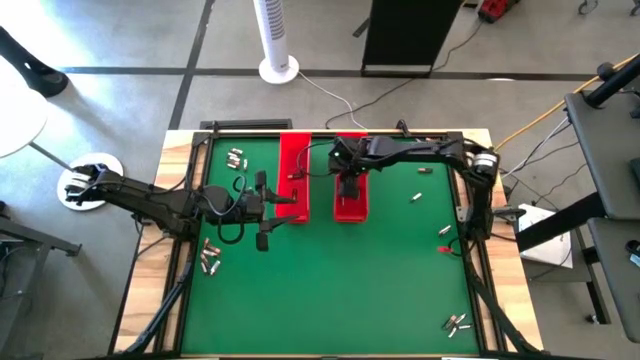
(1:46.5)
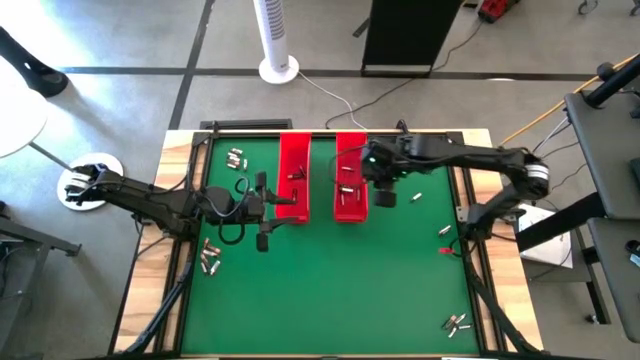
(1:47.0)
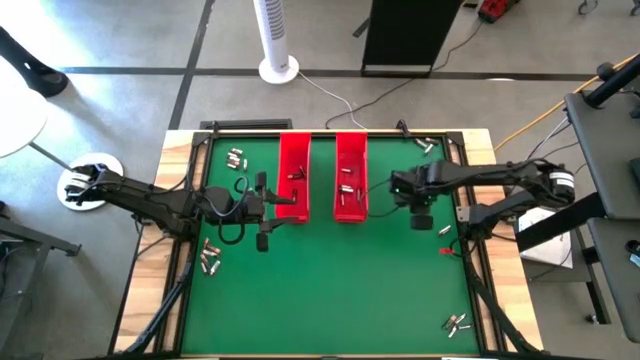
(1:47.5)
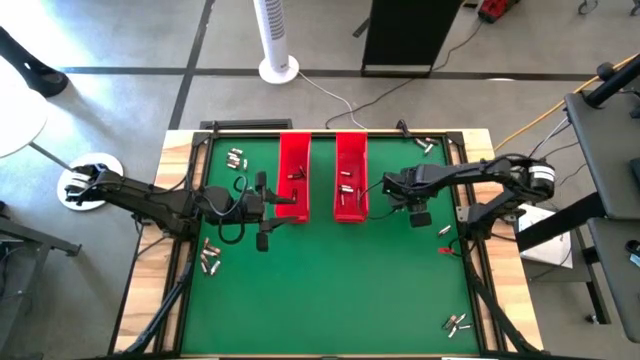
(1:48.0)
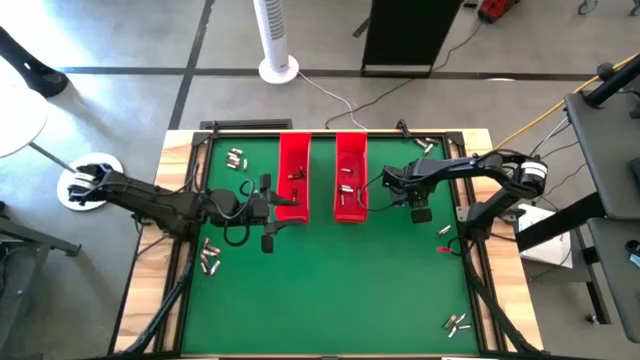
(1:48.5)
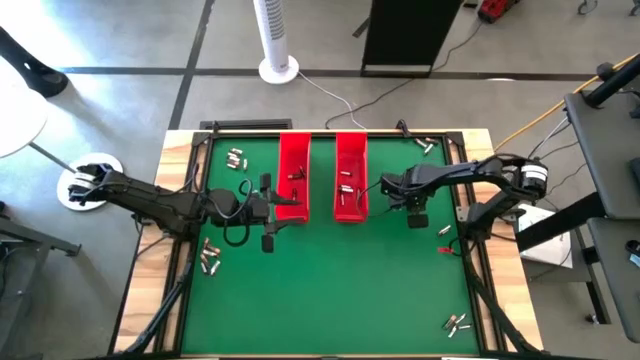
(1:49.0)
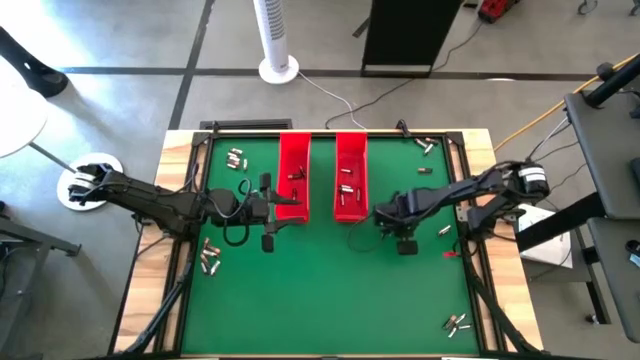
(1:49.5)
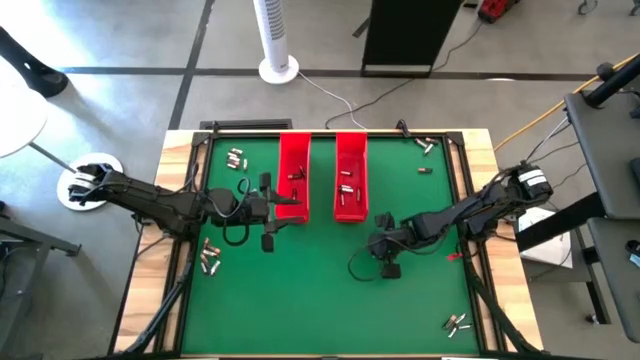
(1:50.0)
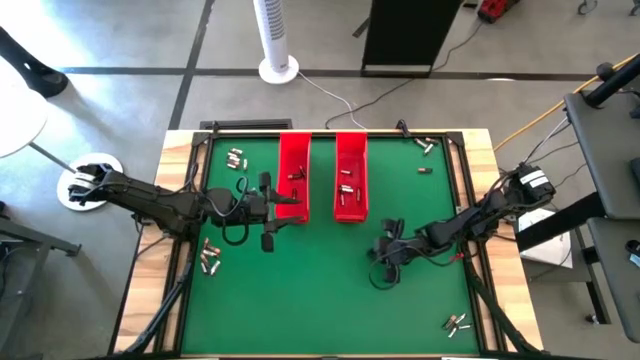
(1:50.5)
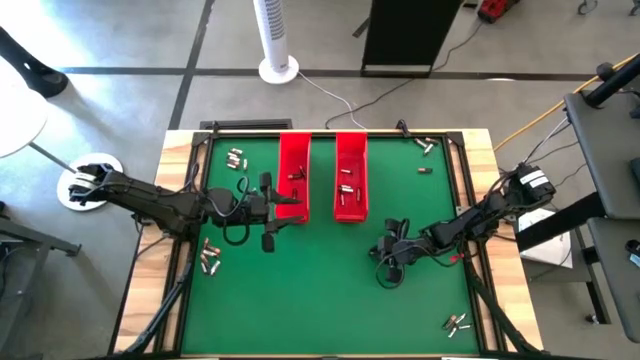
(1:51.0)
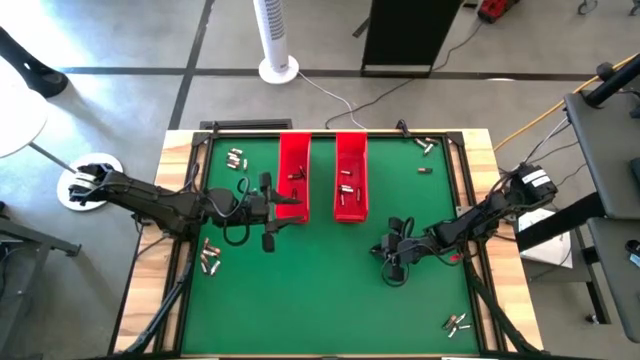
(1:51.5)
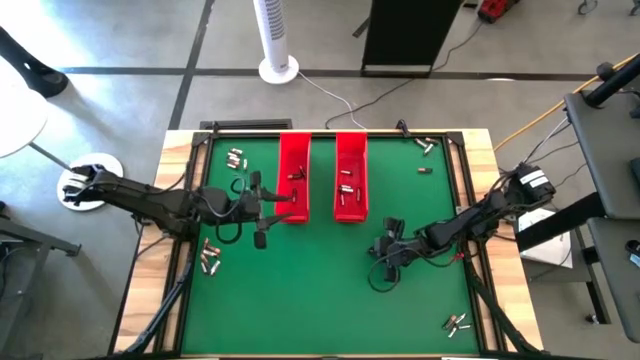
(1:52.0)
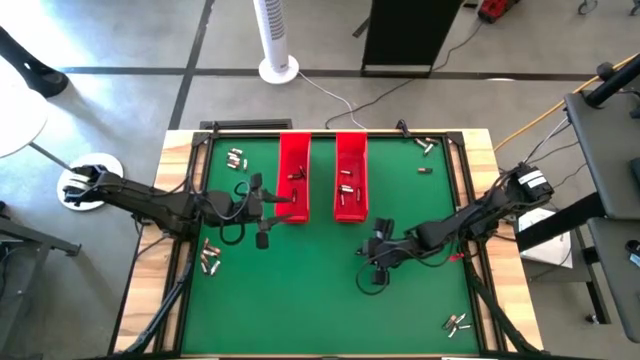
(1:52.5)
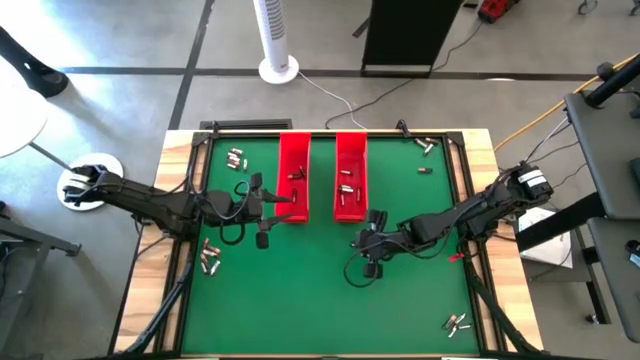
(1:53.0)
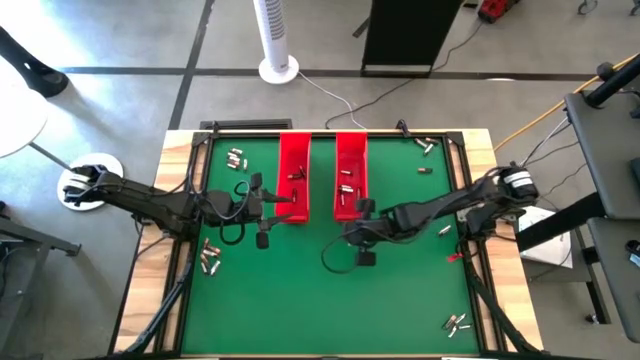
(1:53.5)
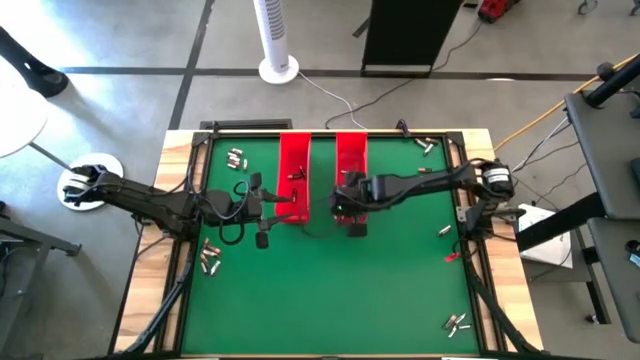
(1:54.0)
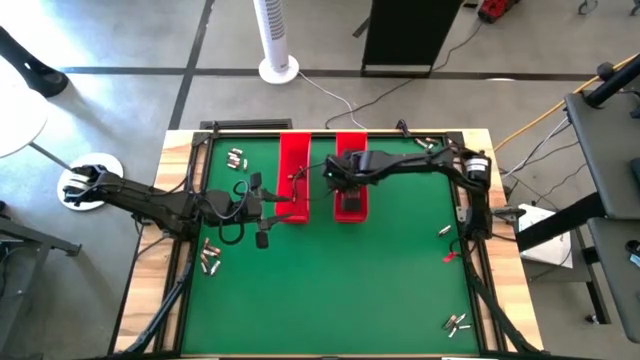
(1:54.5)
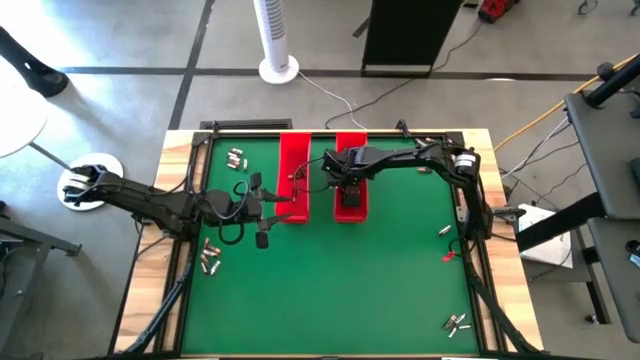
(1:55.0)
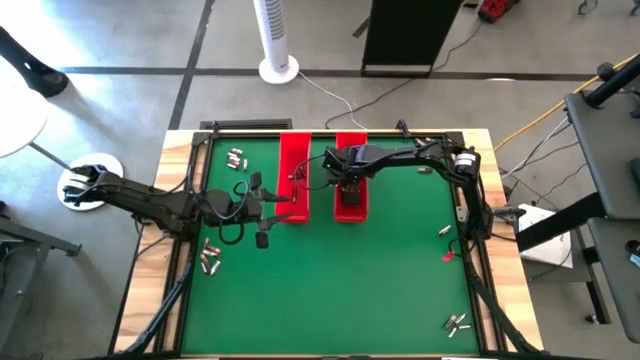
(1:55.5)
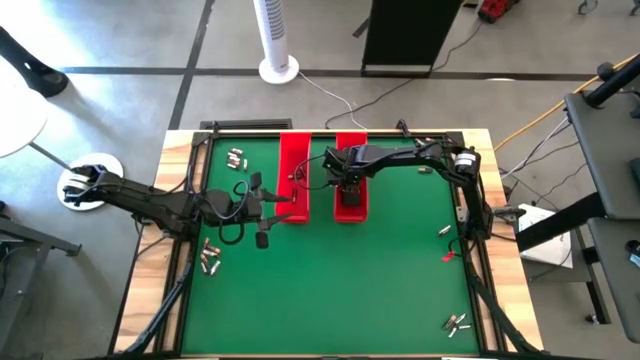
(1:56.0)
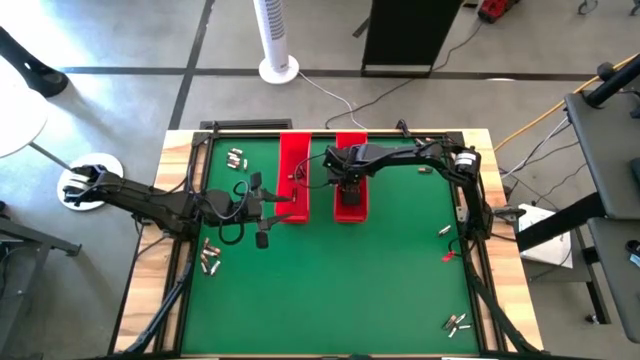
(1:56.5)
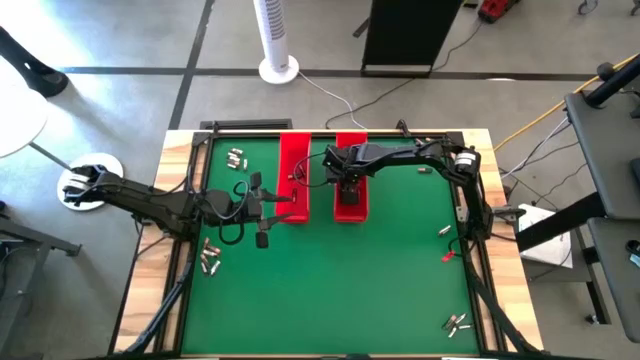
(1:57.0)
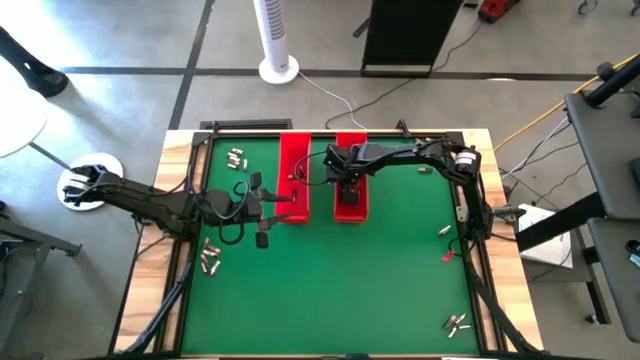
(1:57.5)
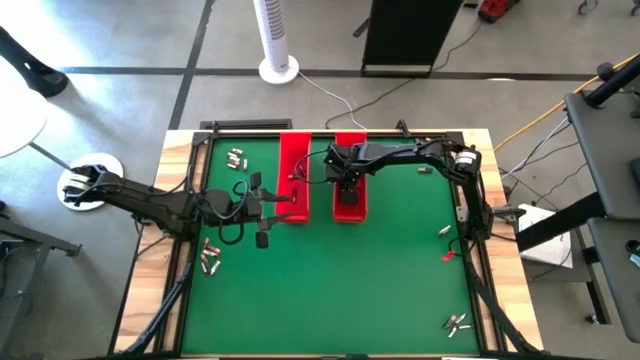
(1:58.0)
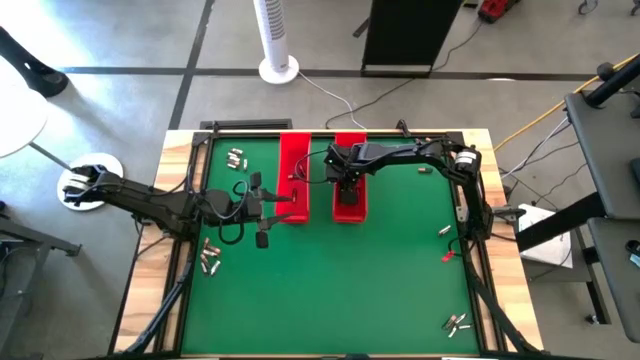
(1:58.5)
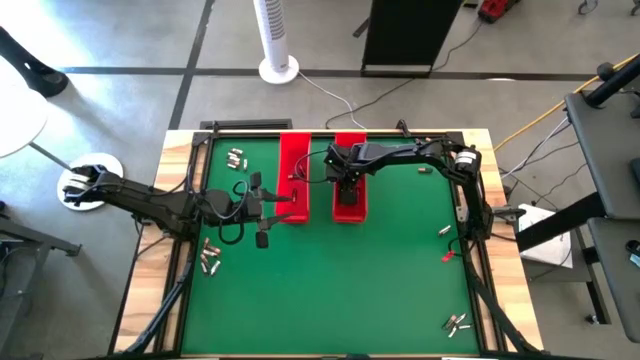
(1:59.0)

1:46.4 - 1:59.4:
Task: Sort batteries
Put the silver battery into the right red bin

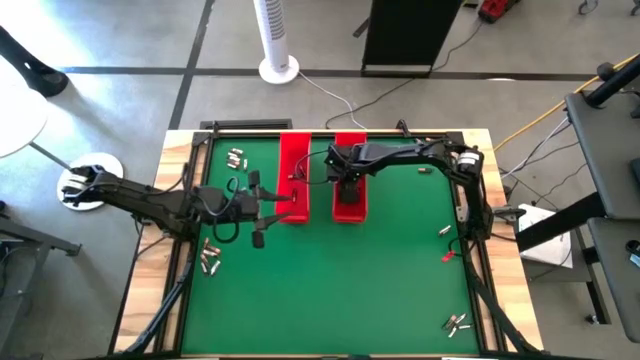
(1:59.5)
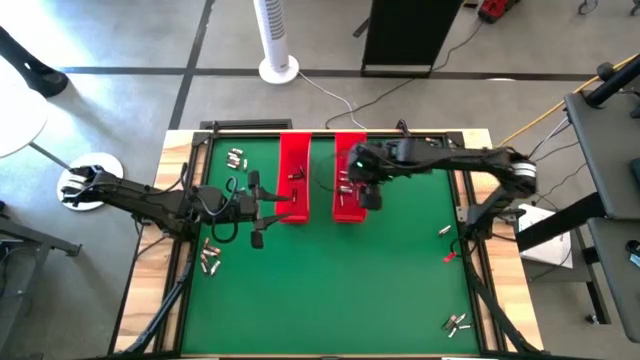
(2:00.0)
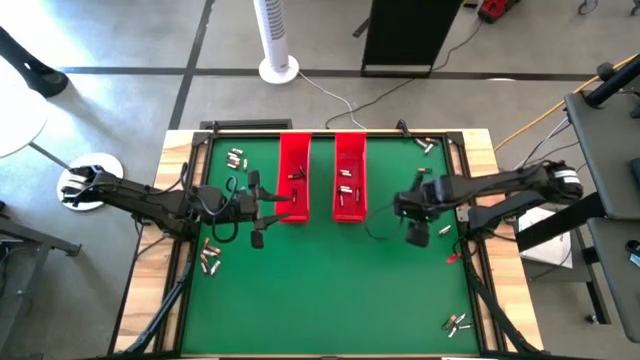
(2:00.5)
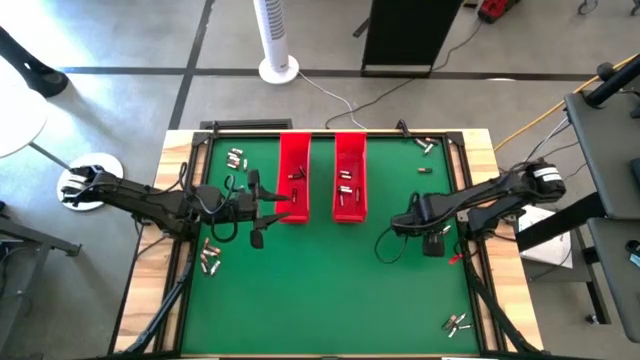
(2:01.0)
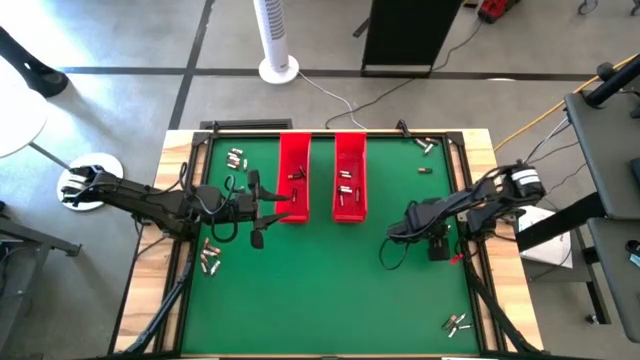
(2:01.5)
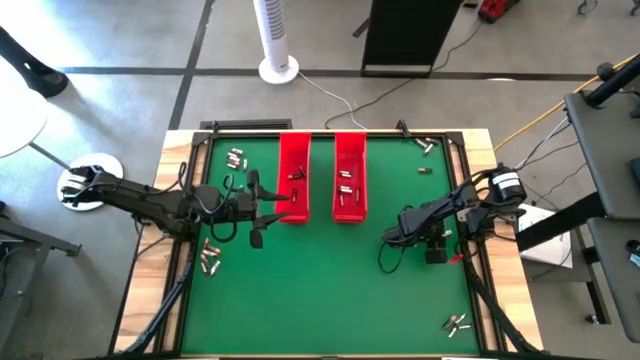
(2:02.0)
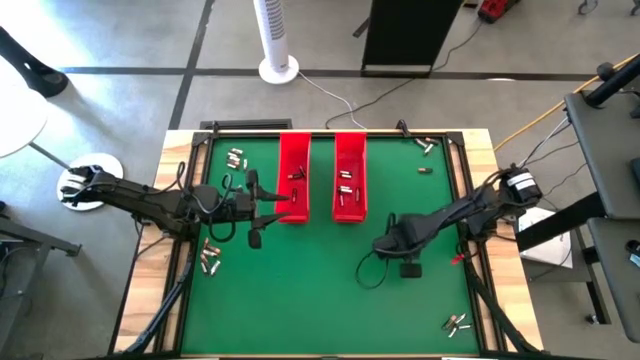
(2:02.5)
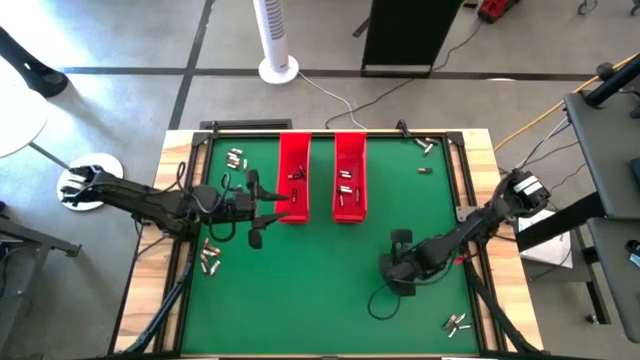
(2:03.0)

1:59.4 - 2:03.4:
Put the silver battery into the right red bin

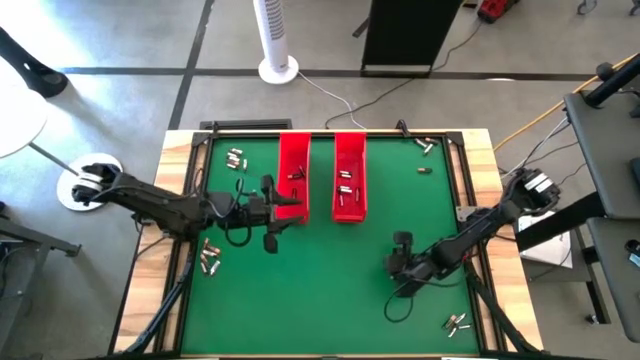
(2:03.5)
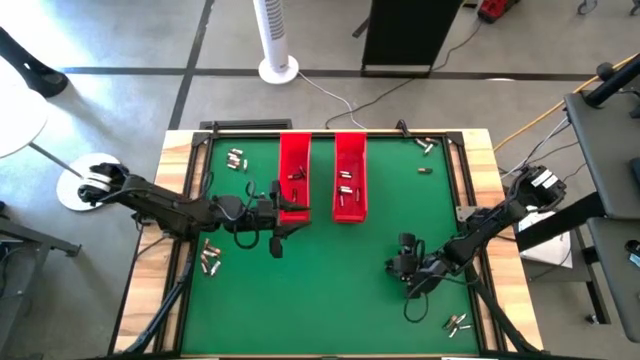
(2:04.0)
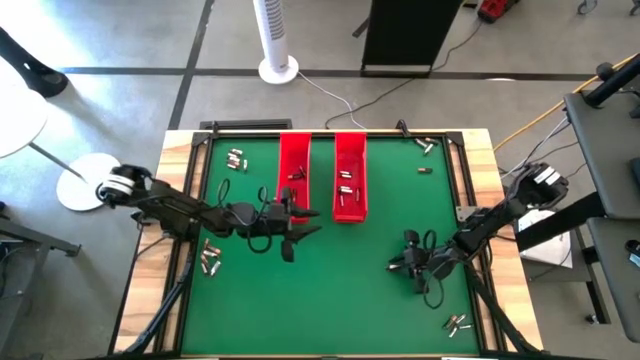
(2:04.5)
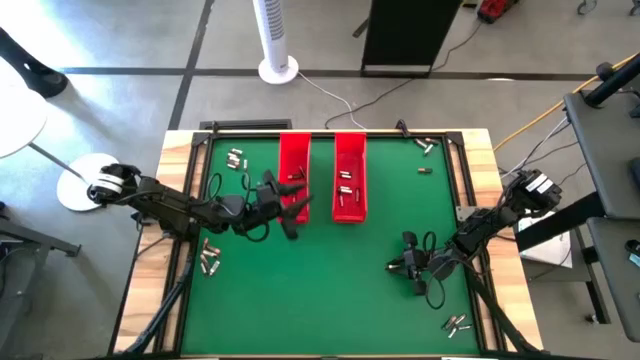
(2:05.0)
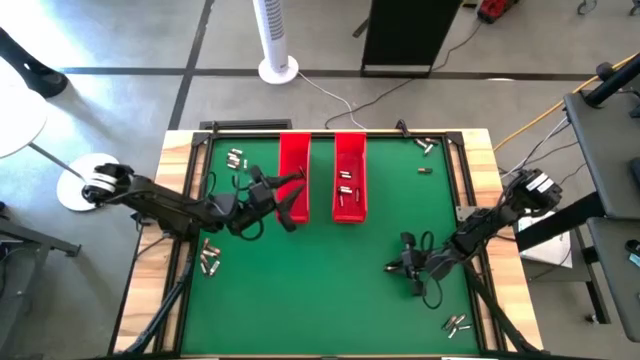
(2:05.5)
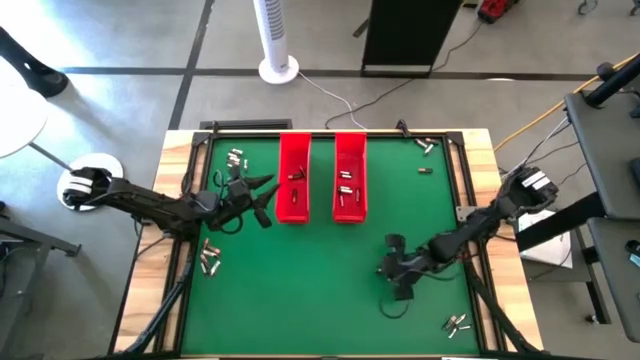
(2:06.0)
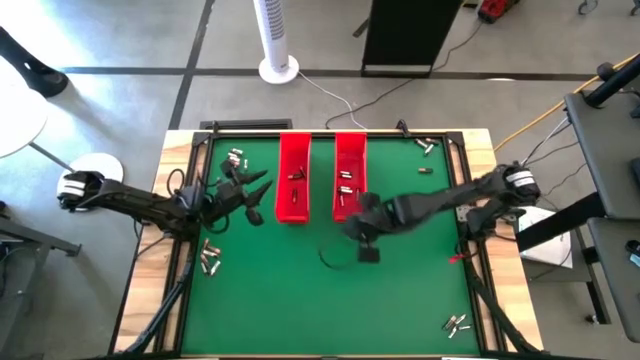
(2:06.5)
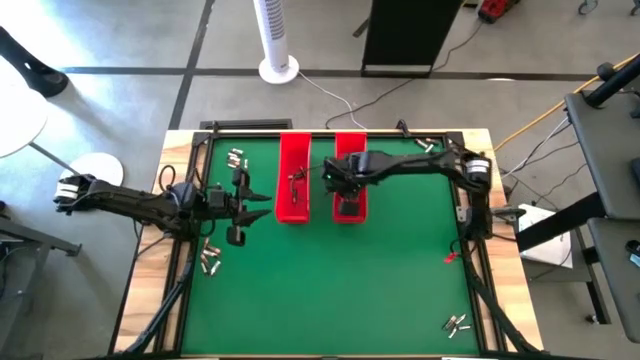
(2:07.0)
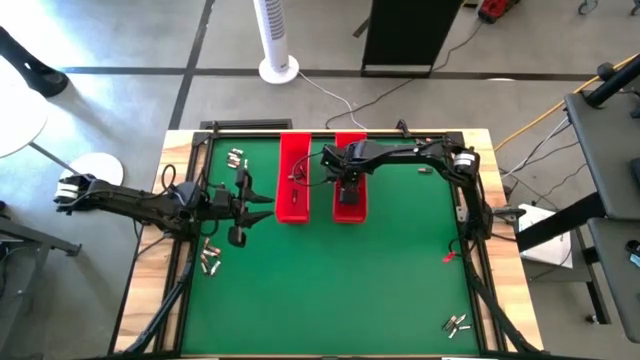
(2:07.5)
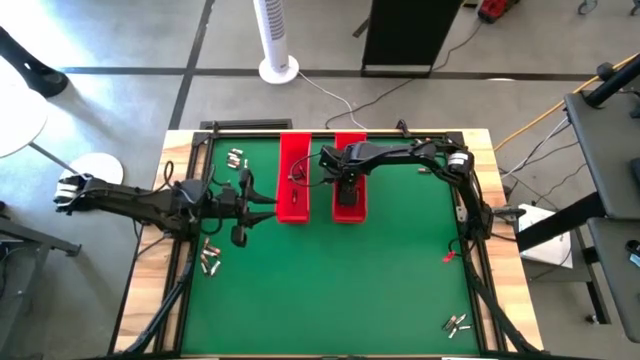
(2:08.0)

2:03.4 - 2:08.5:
Put the silver battery into the right red bin
